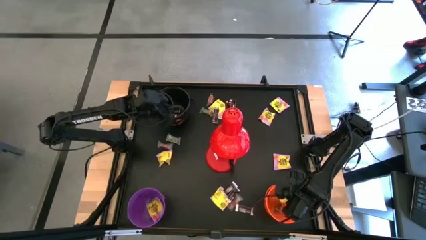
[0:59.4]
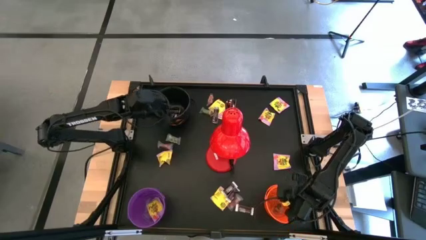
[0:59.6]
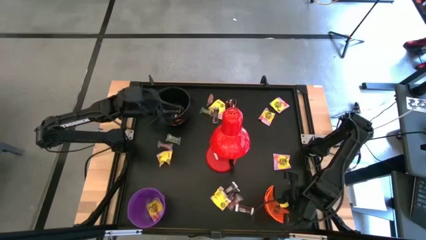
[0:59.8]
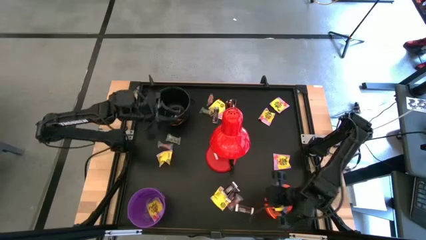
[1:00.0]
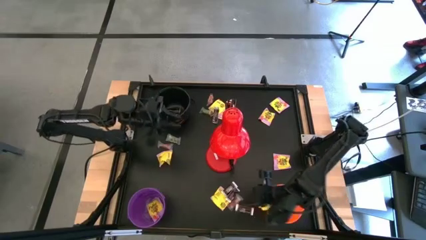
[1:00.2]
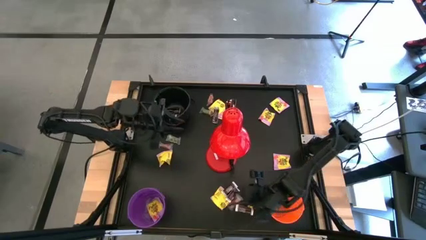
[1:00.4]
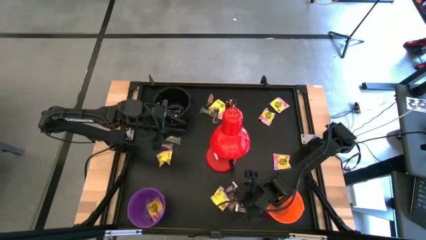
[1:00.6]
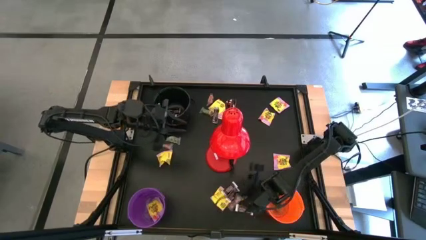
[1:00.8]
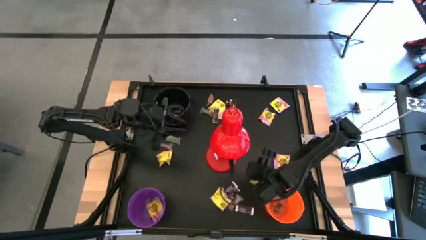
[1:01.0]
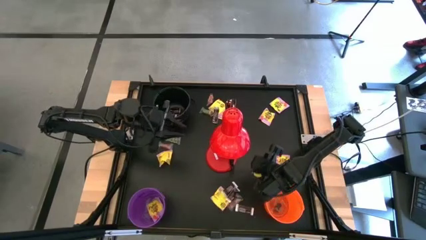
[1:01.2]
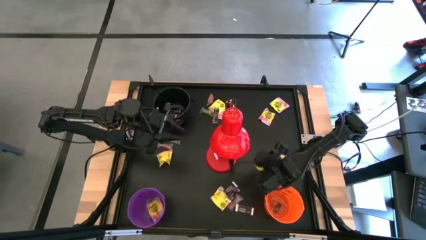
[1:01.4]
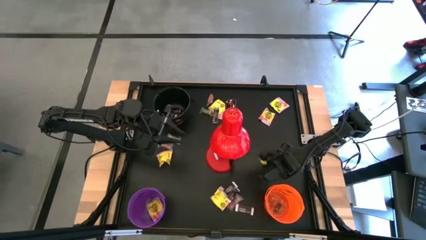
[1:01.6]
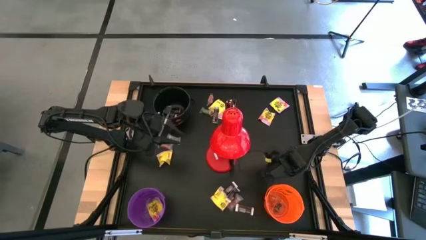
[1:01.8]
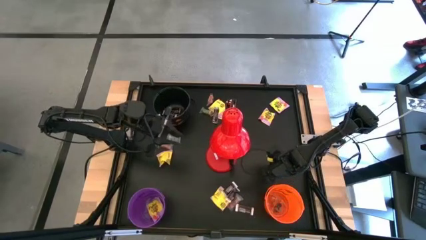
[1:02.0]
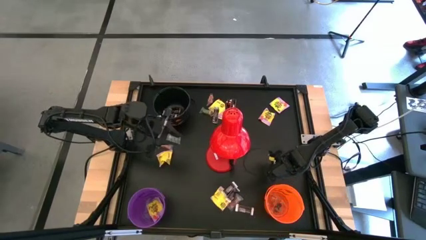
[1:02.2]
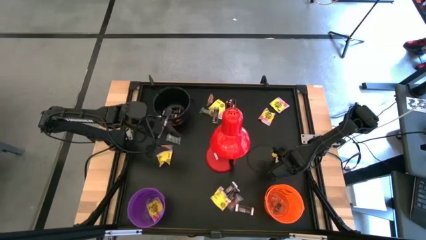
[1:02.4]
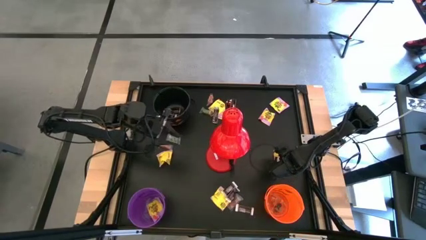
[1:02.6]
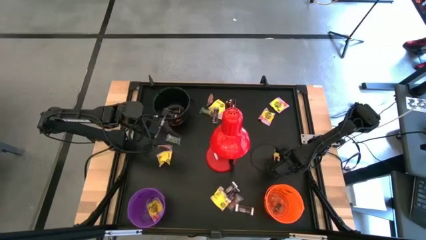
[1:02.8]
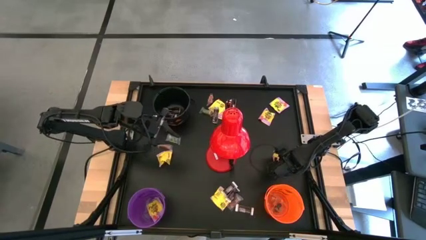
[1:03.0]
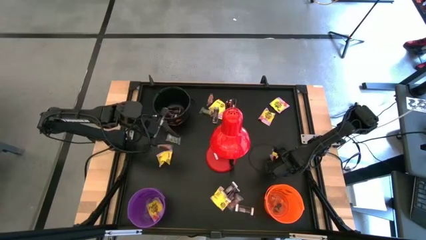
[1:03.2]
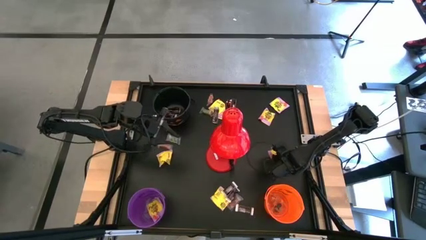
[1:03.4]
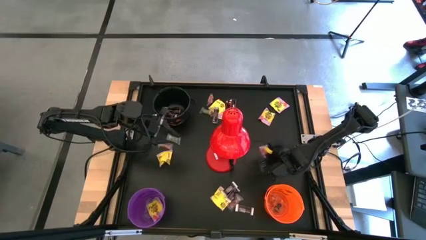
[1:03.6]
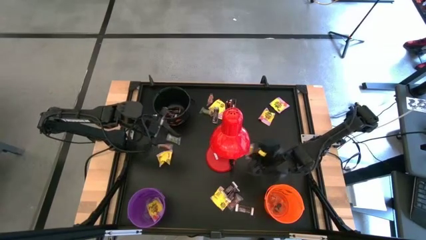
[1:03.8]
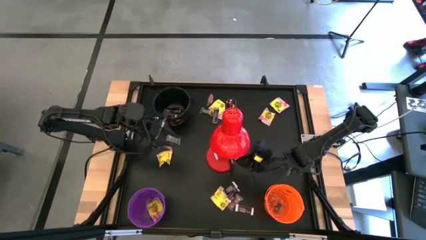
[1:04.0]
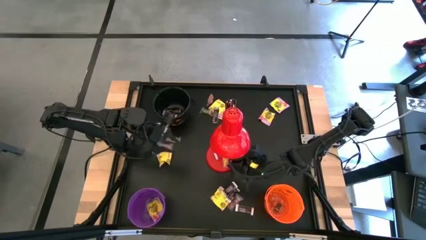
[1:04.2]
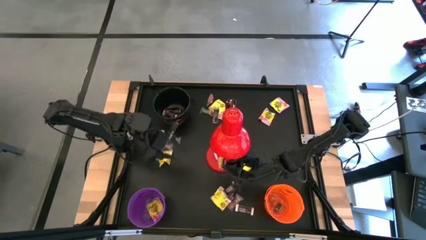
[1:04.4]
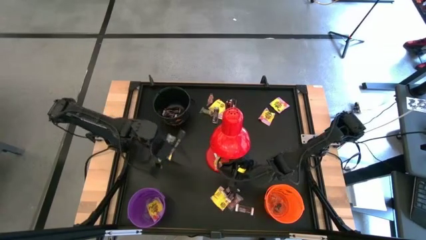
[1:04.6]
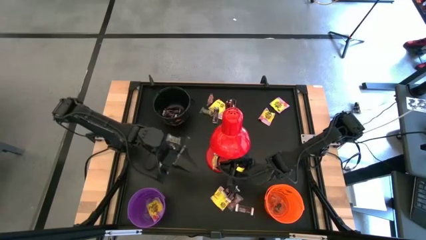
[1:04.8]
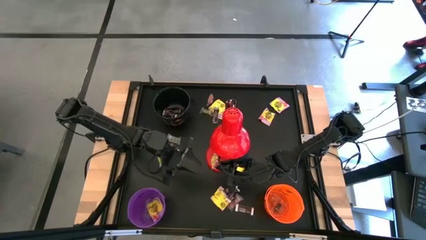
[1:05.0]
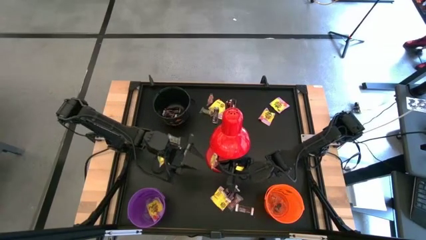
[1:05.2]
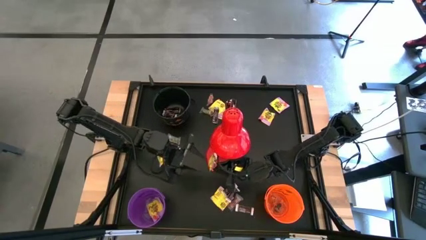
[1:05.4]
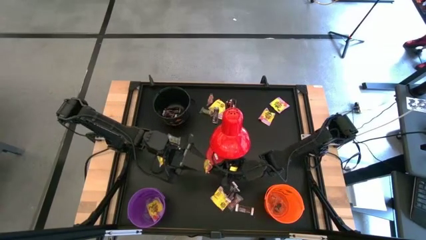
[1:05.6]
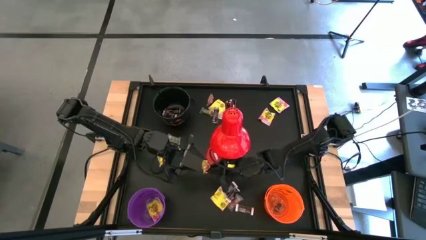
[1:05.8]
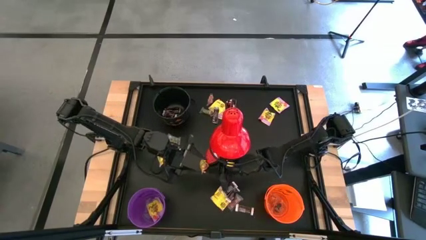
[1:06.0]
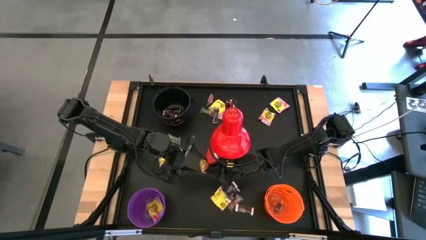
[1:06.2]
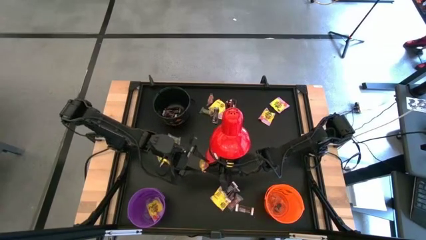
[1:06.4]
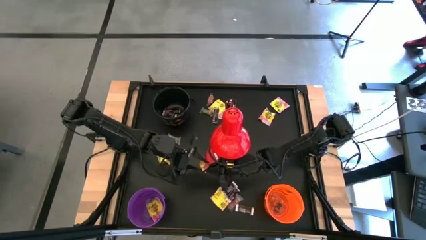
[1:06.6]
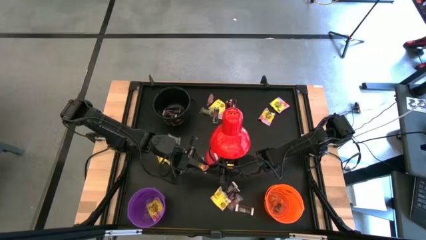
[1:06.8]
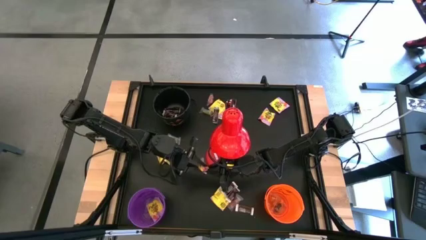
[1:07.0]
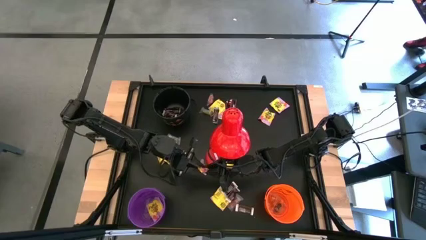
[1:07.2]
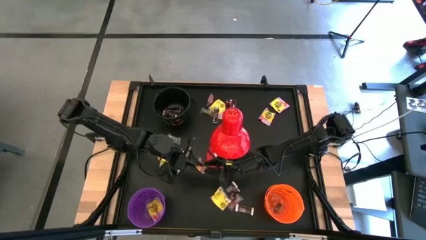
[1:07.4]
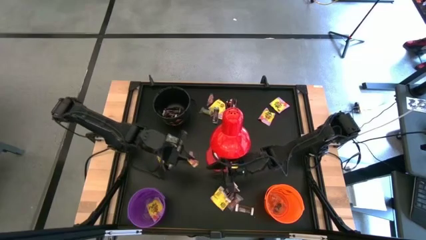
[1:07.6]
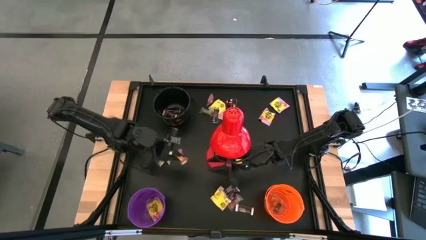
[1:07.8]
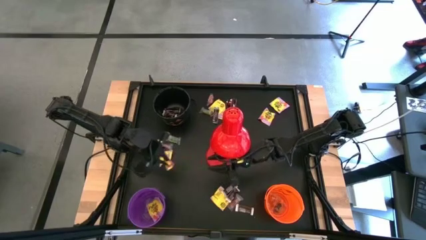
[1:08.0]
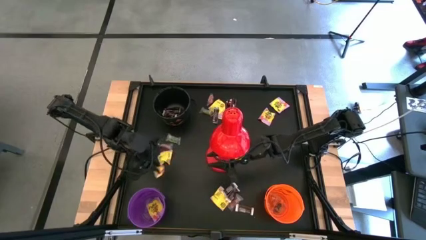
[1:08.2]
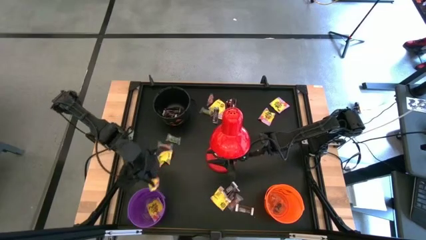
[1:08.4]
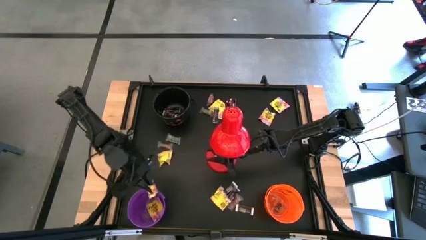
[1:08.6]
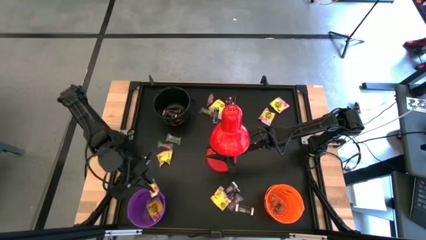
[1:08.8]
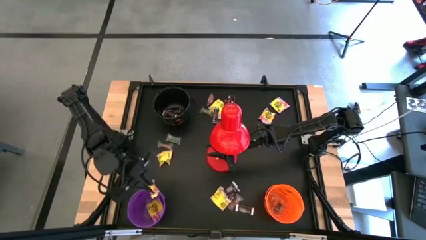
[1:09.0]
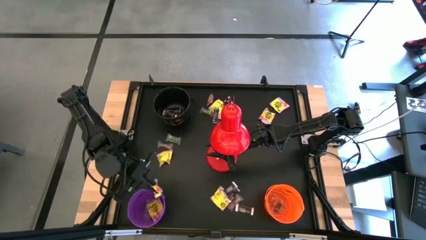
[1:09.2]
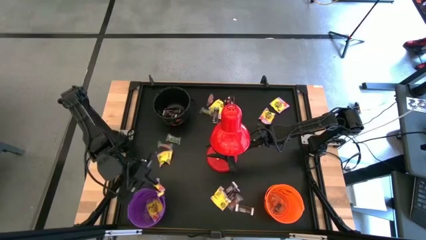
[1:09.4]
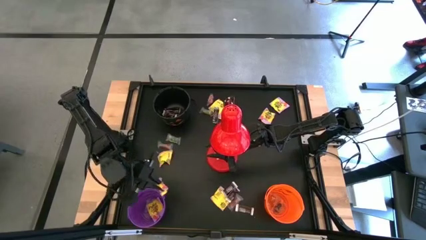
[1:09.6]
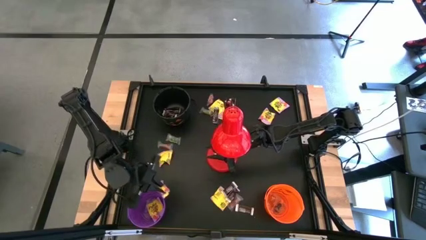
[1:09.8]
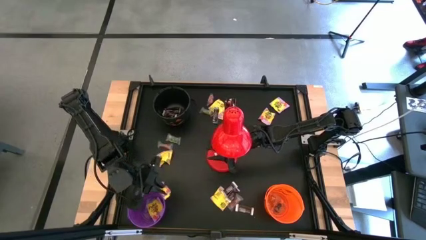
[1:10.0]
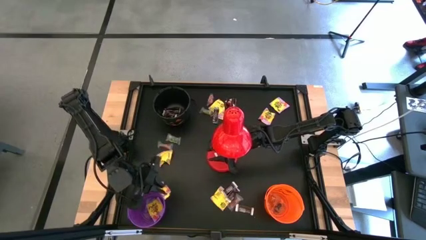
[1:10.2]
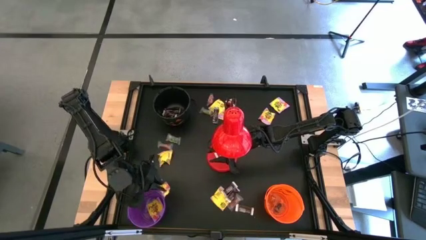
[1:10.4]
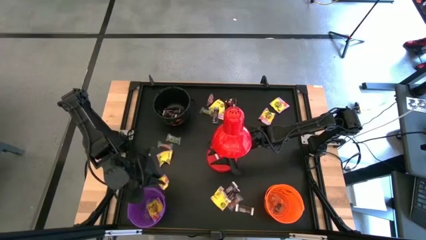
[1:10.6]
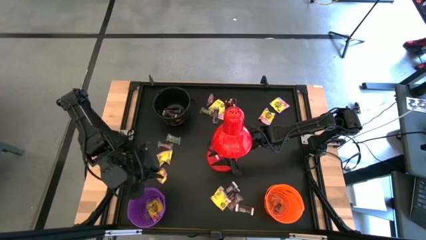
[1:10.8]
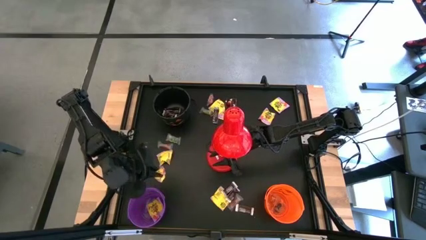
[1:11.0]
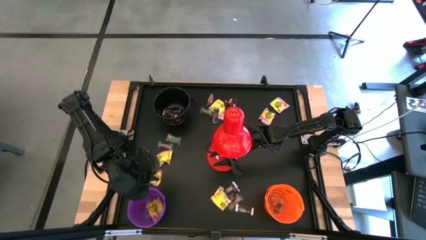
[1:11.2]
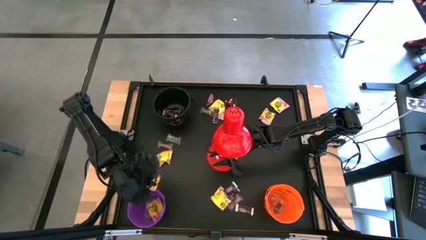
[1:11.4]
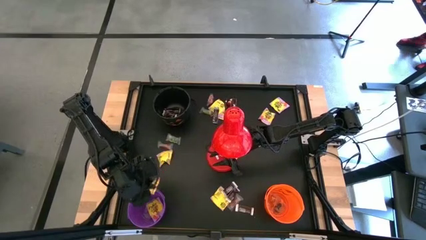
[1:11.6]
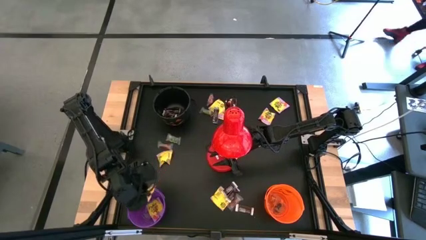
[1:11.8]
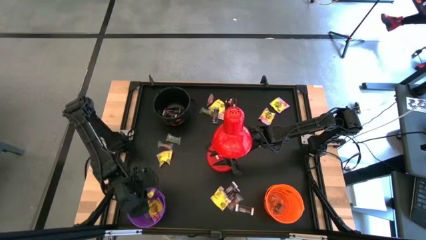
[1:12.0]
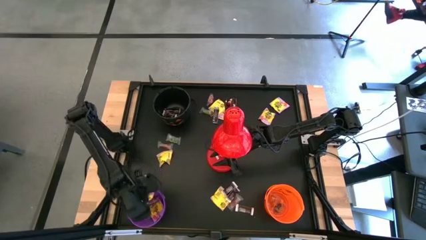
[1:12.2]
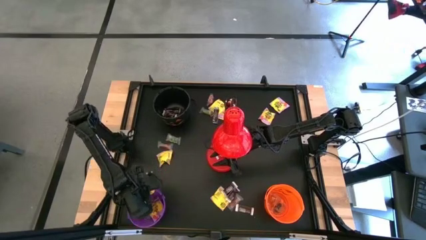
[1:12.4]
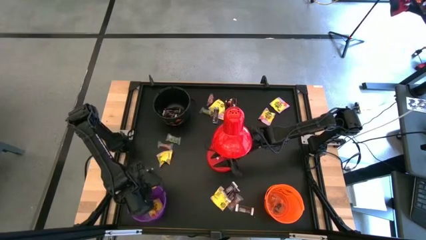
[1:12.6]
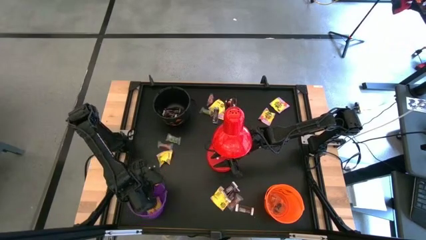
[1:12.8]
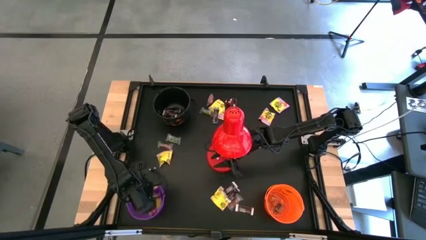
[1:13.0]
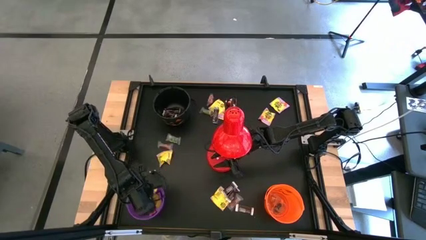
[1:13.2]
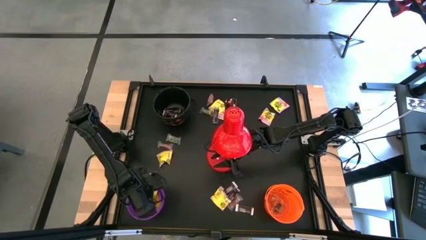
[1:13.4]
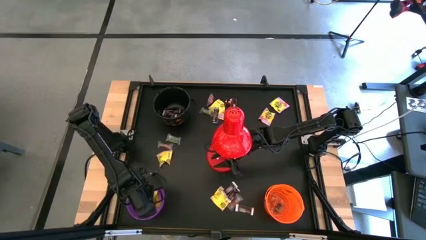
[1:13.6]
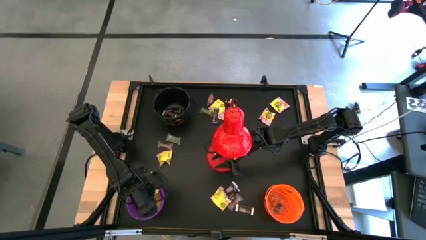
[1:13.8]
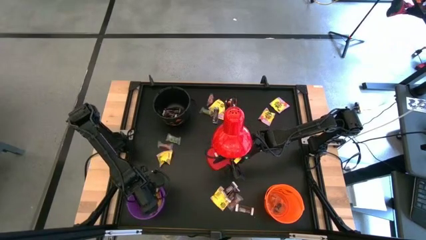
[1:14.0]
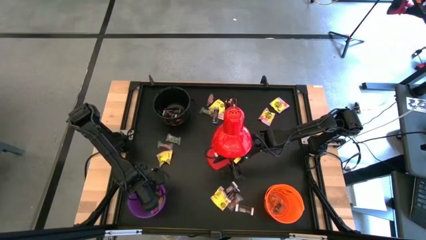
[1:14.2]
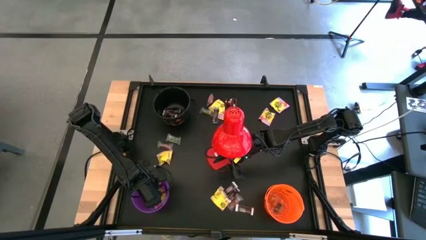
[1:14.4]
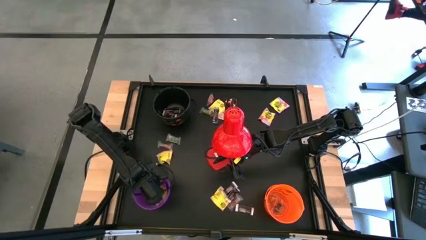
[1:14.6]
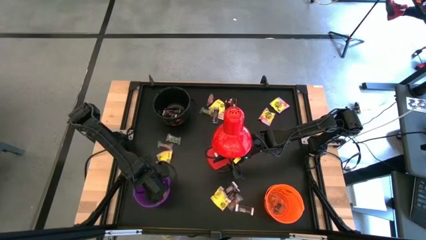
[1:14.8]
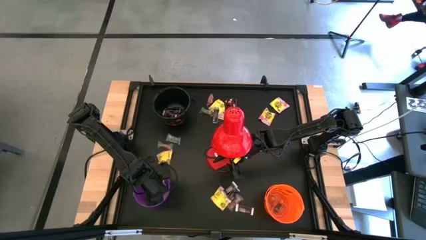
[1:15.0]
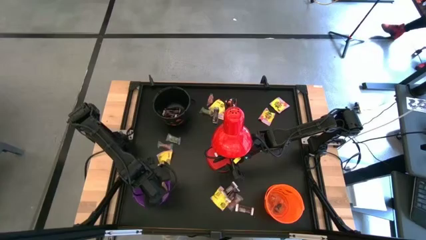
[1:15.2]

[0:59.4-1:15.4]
Task: Organize candy in baskets
Put the yellow candy into the violet bucket
